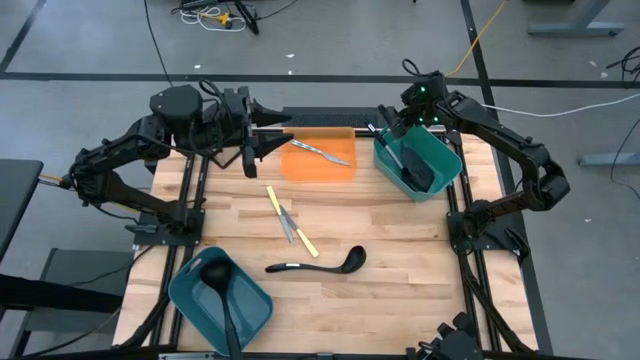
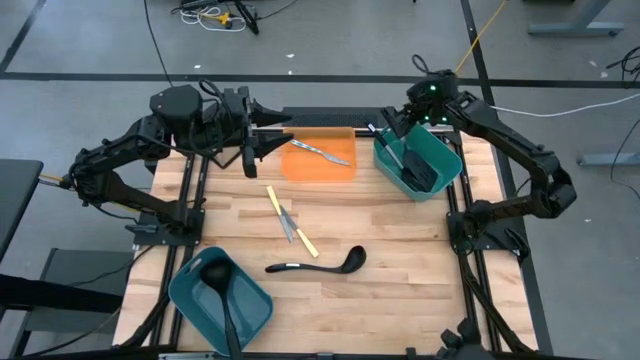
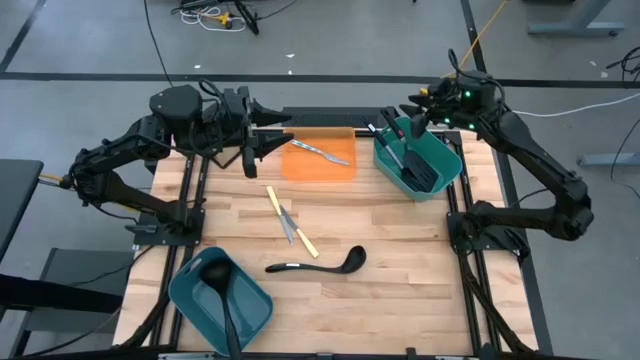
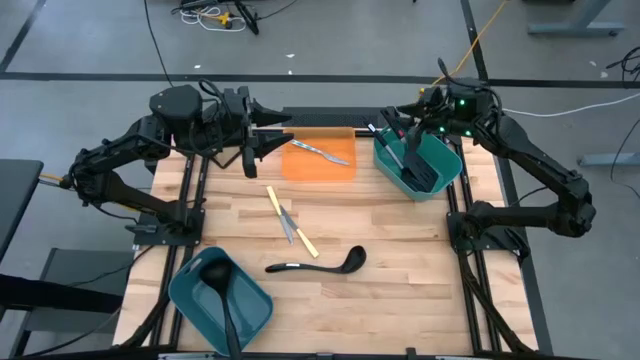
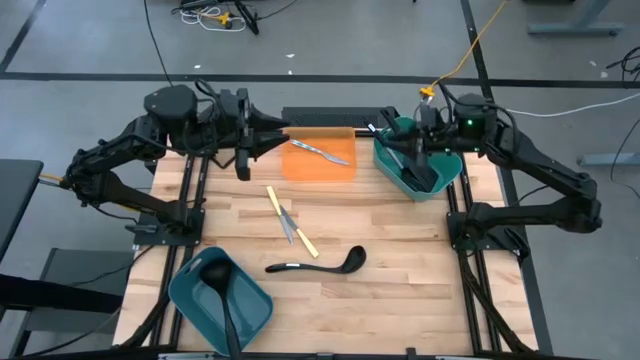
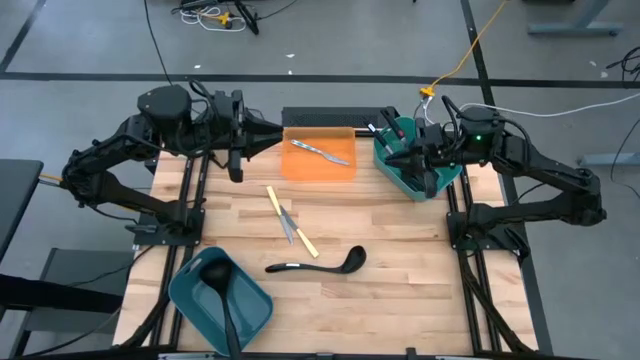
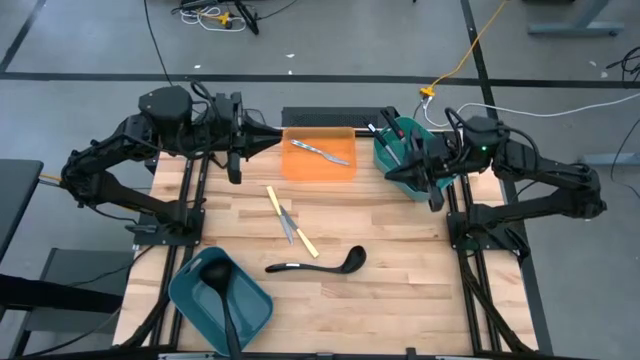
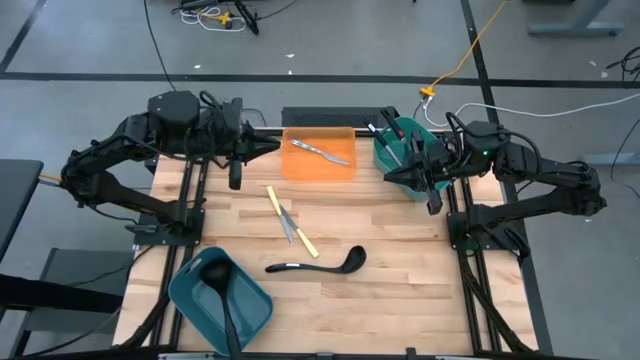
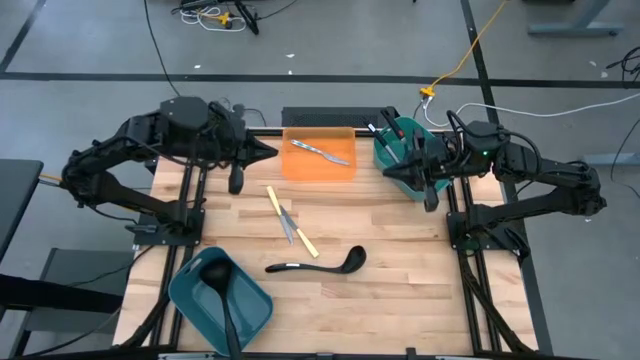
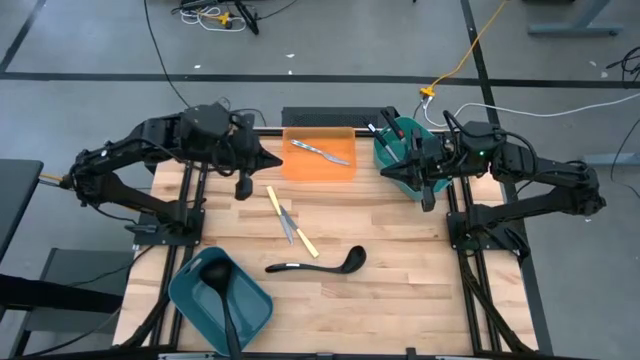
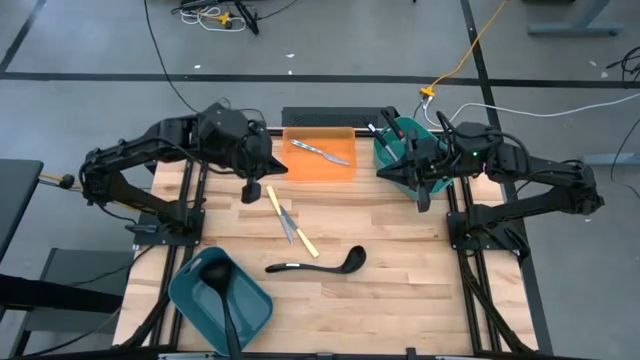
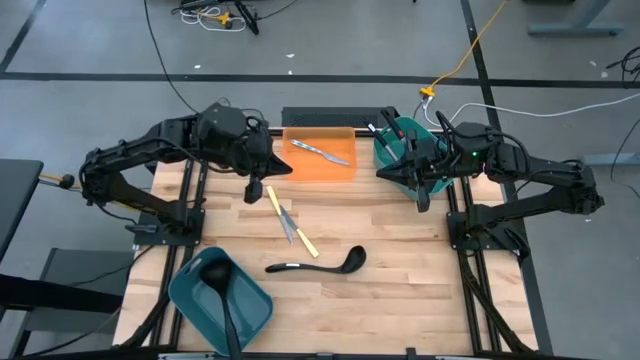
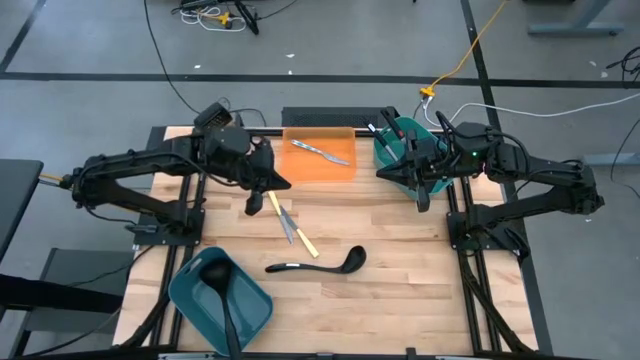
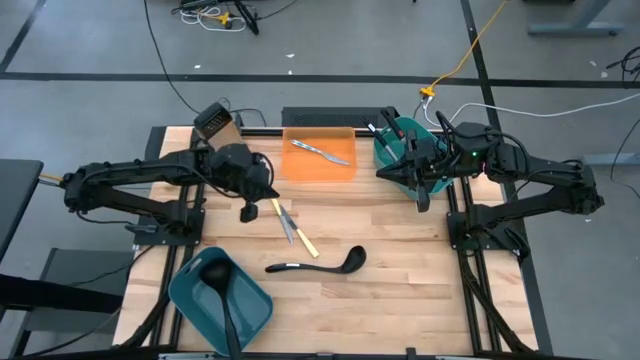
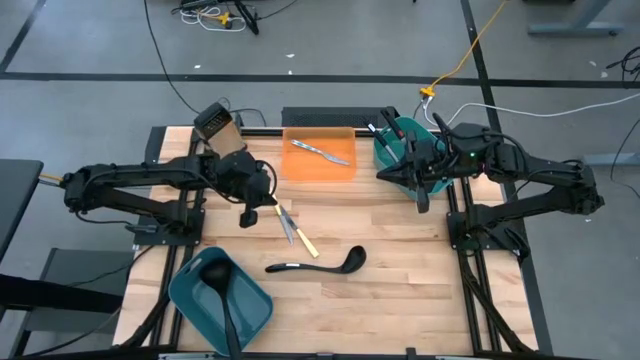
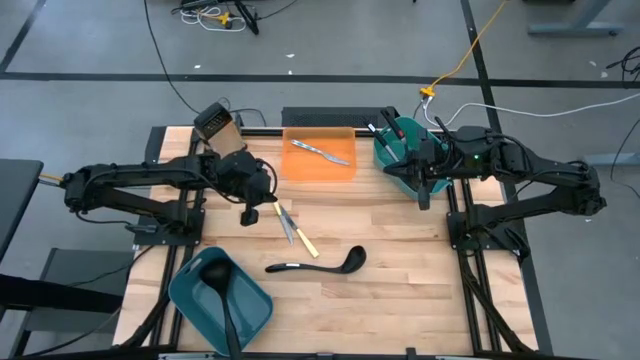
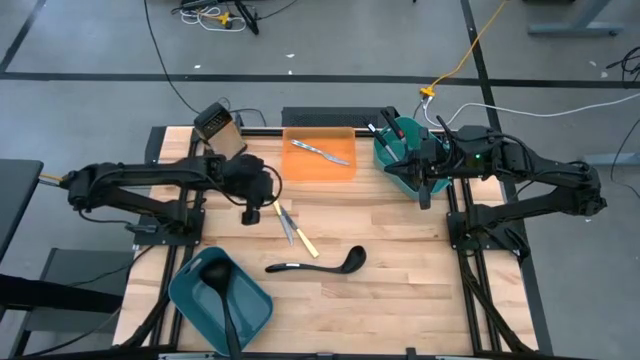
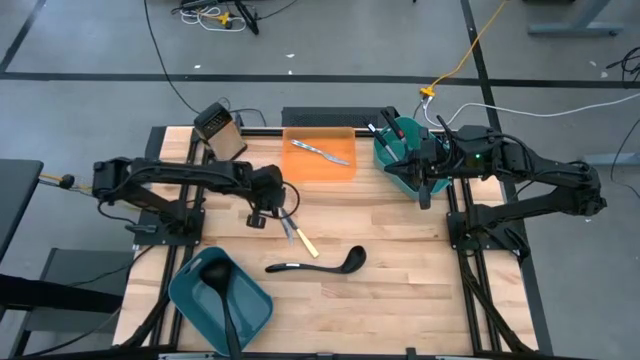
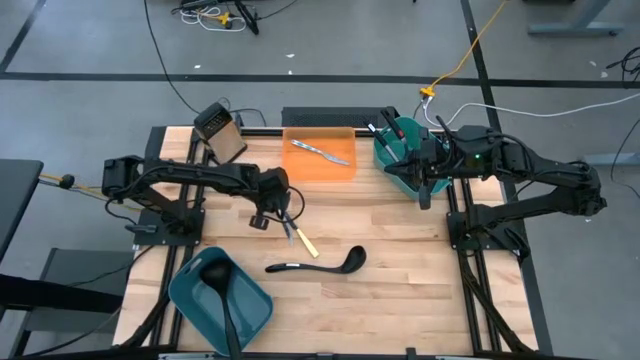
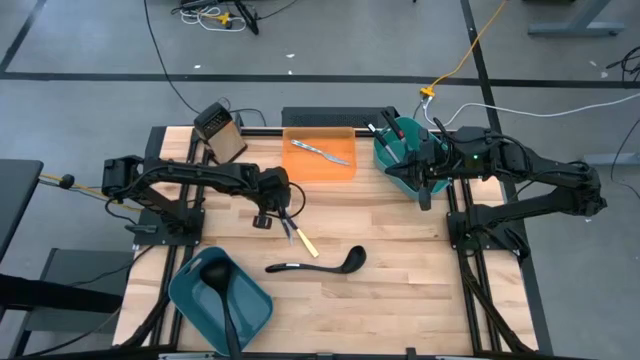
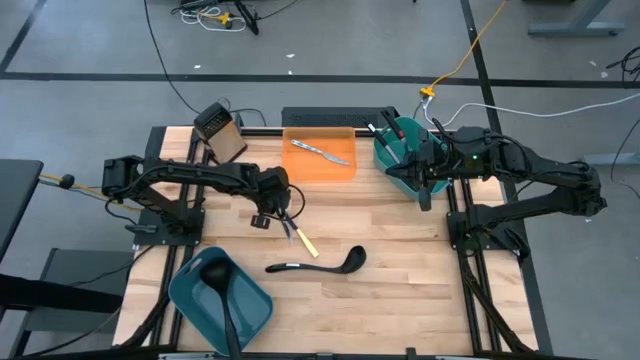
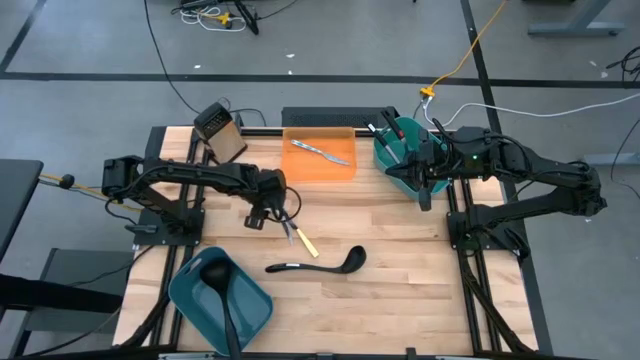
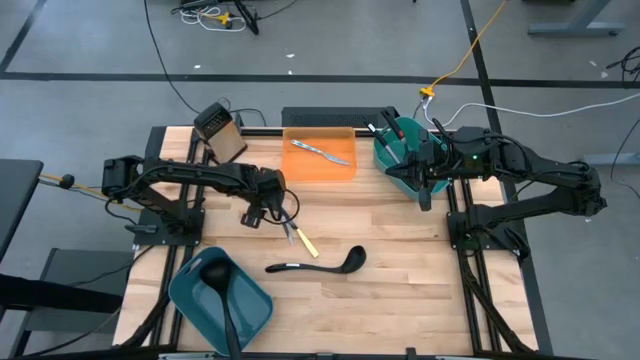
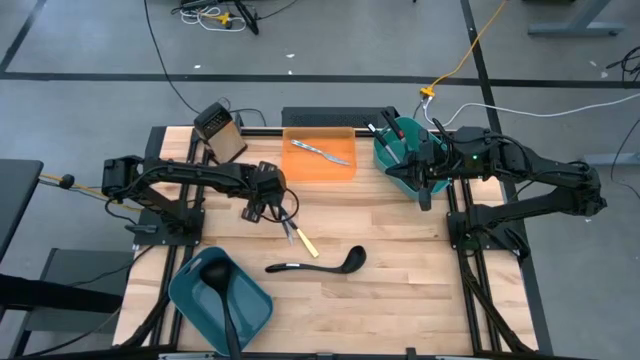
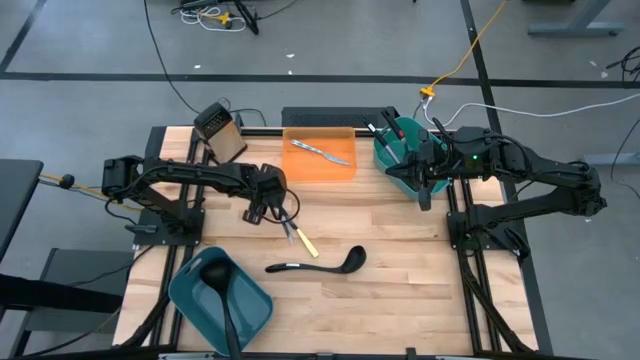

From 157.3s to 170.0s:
Task: Pick & Place Kitchen Items
Put the left yellow knife into the orange bin

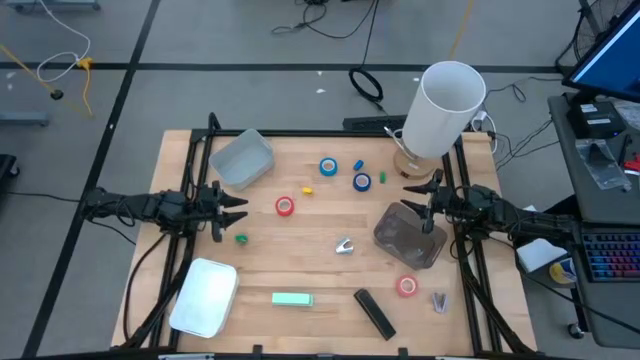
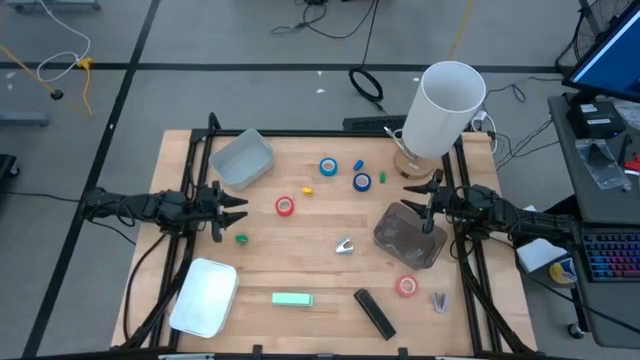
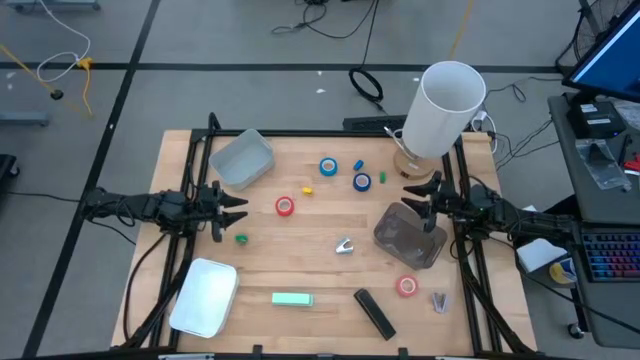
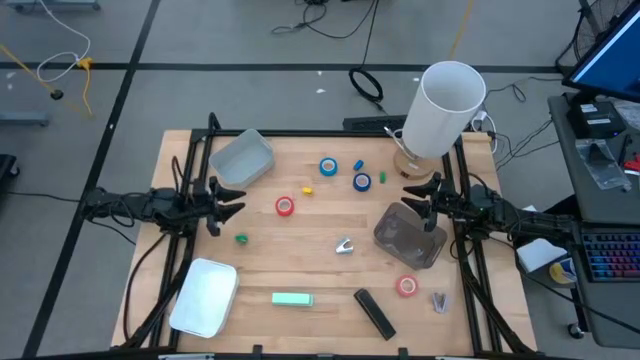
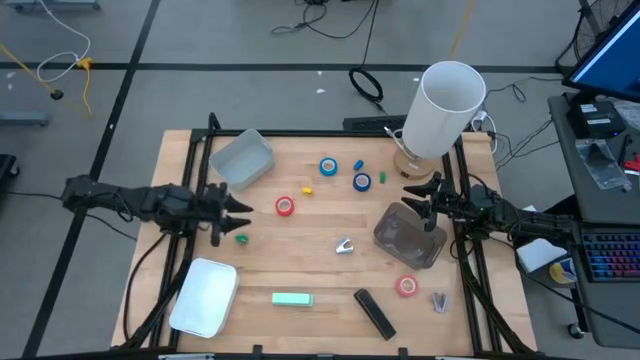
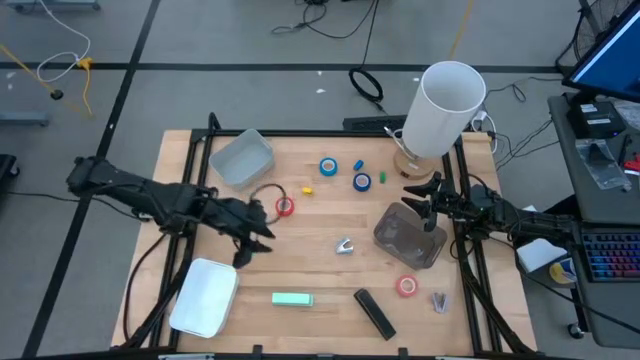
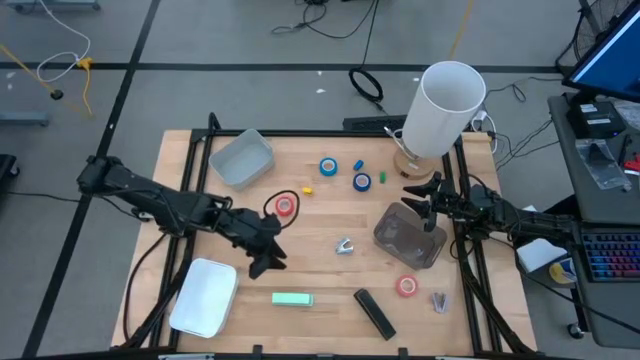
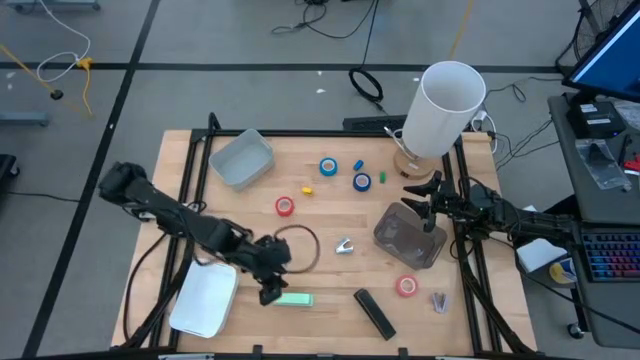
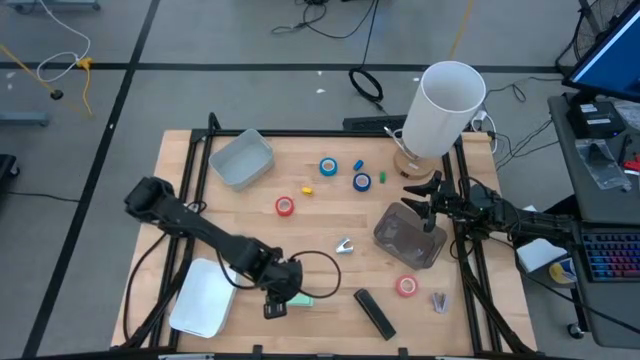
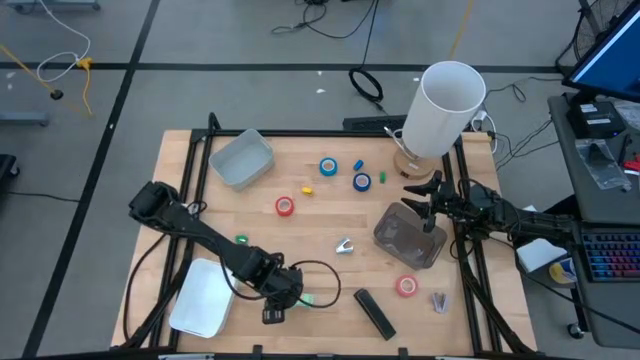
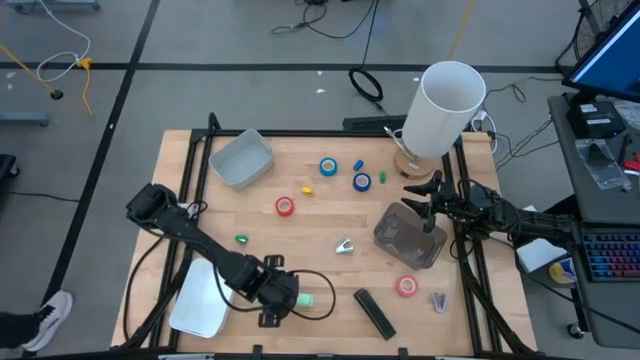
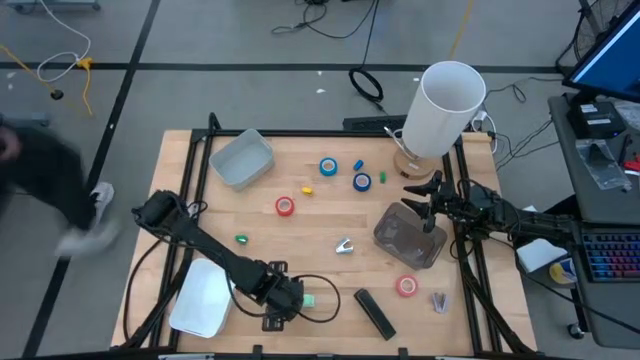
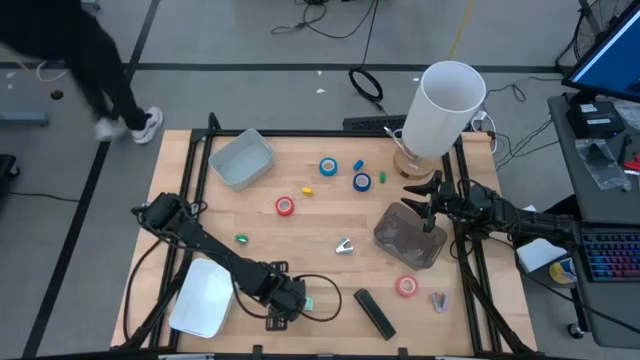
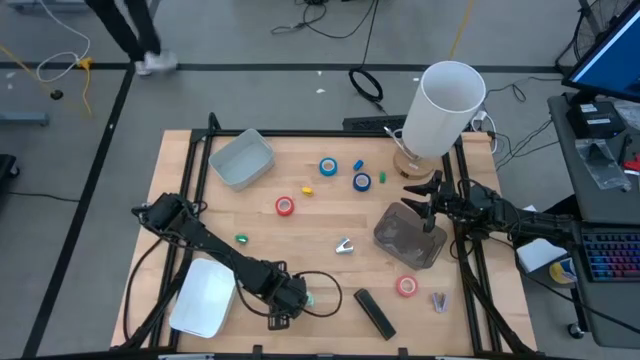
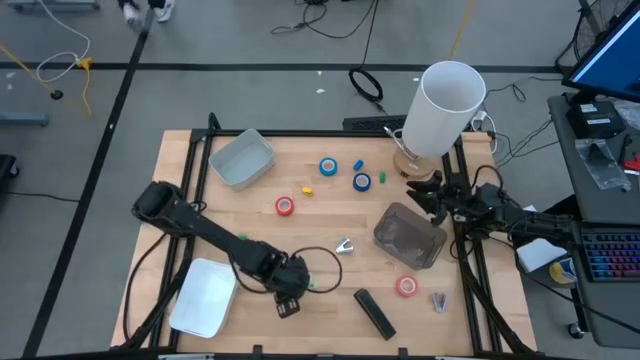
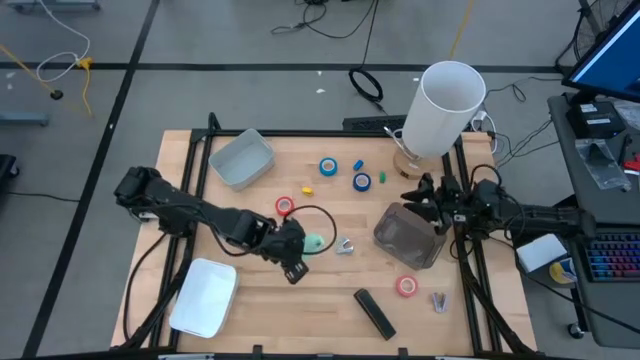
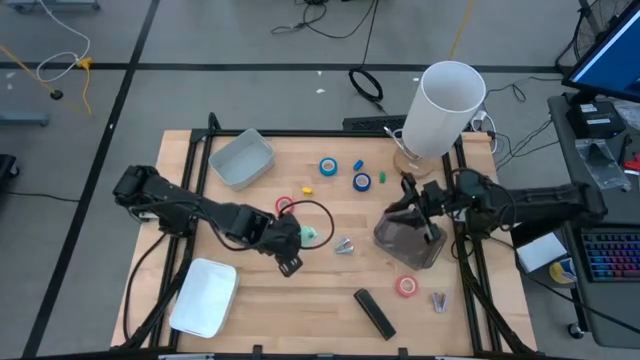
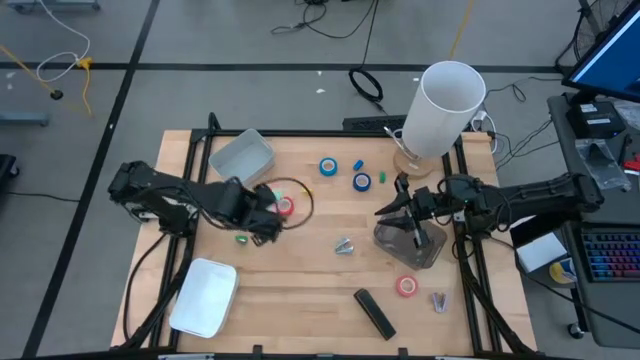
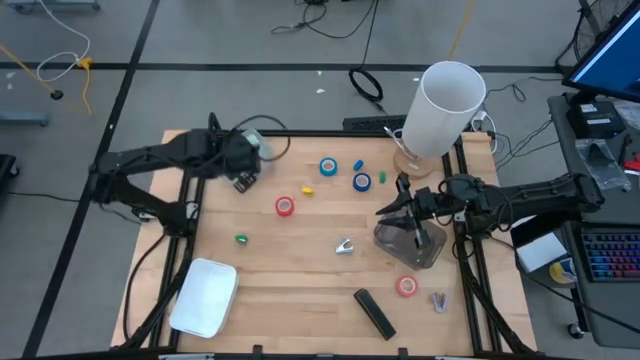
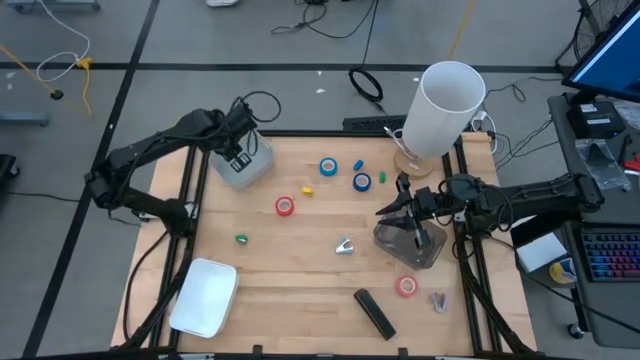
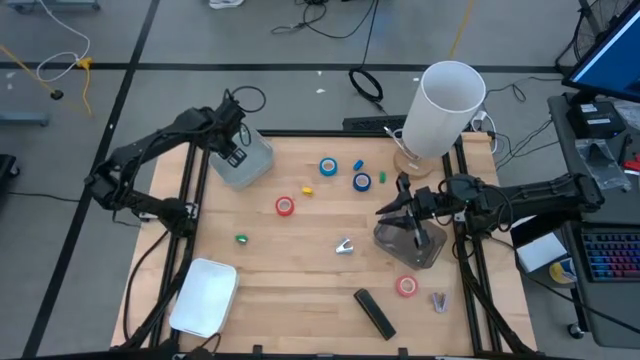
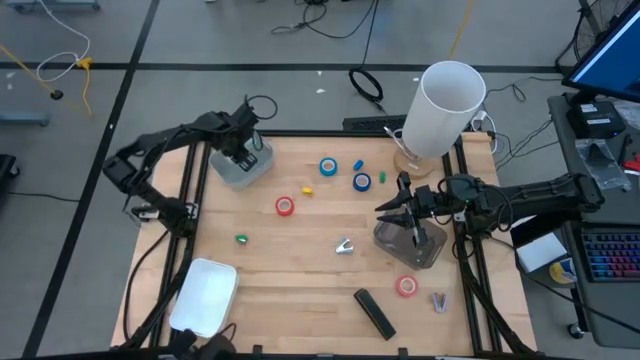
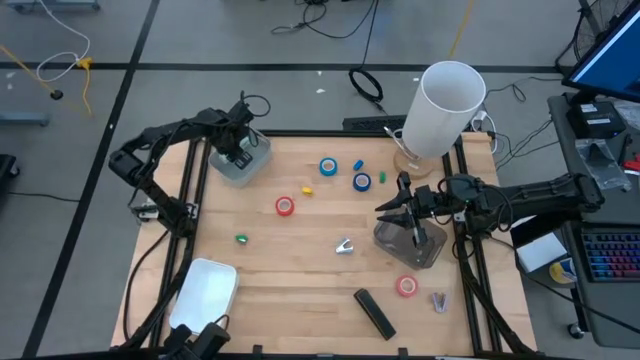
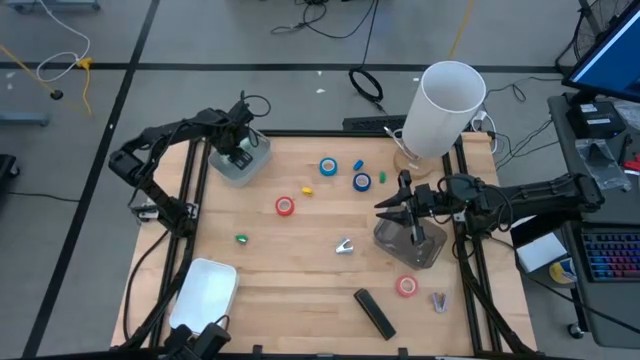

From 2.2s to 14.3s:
Task: Pick and place Stapler, Stapler remover, tape
Put the black light green stapler into the gray bin
